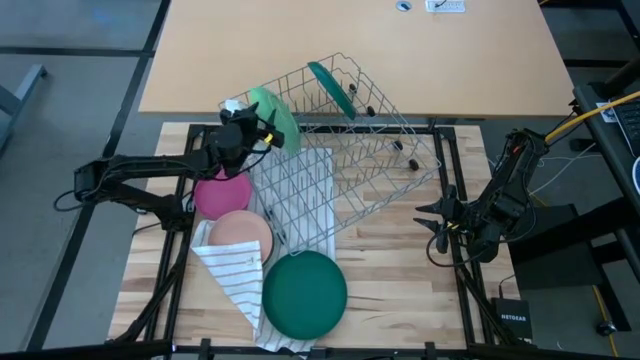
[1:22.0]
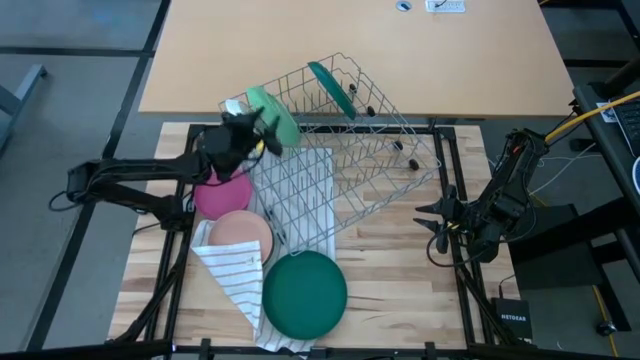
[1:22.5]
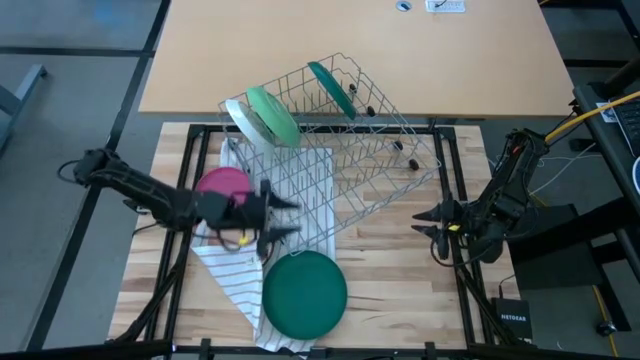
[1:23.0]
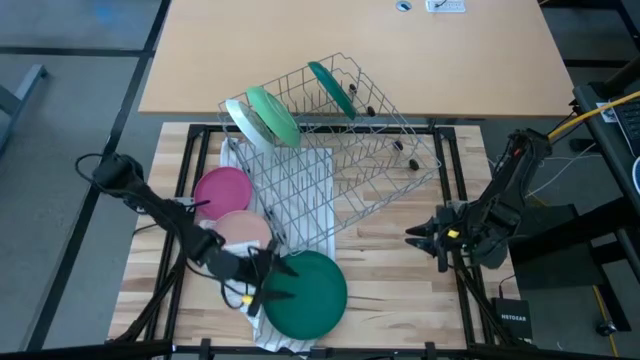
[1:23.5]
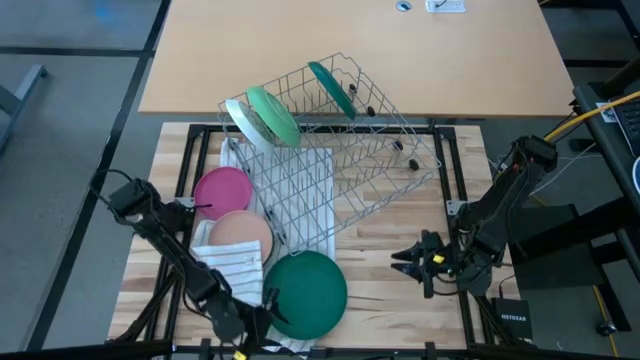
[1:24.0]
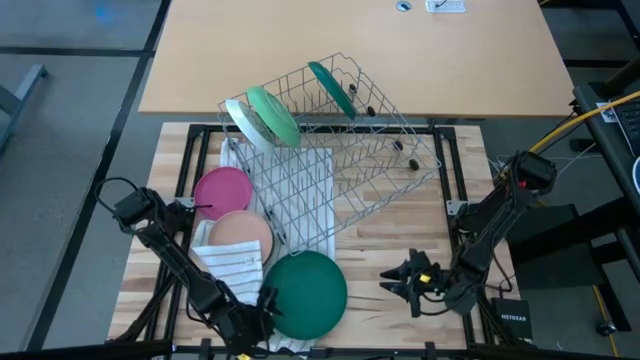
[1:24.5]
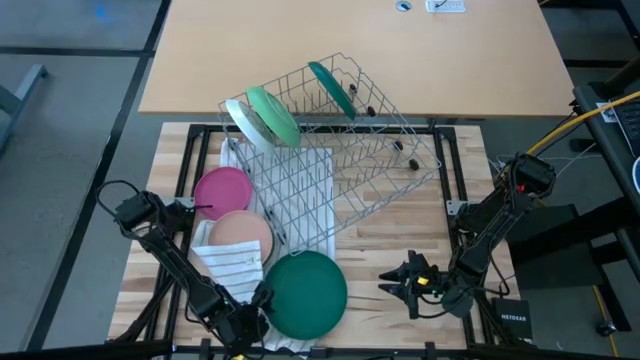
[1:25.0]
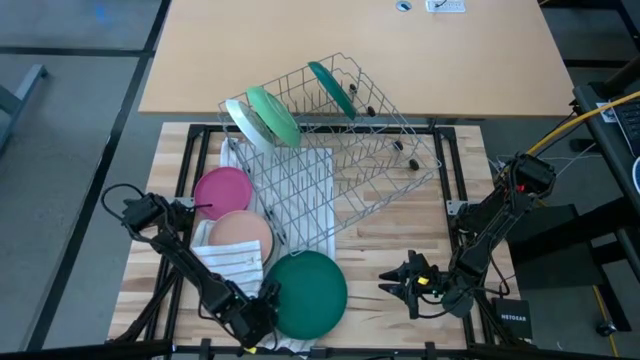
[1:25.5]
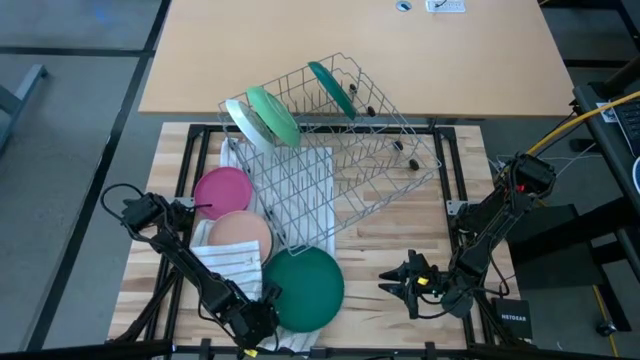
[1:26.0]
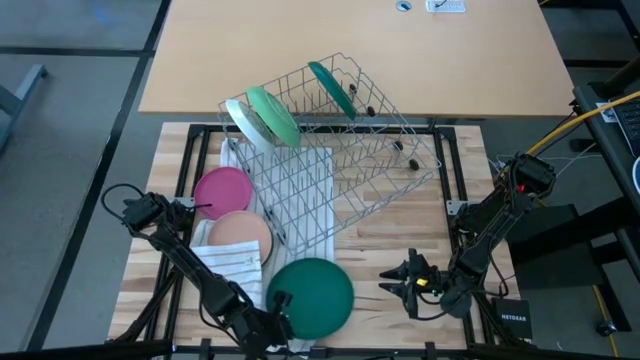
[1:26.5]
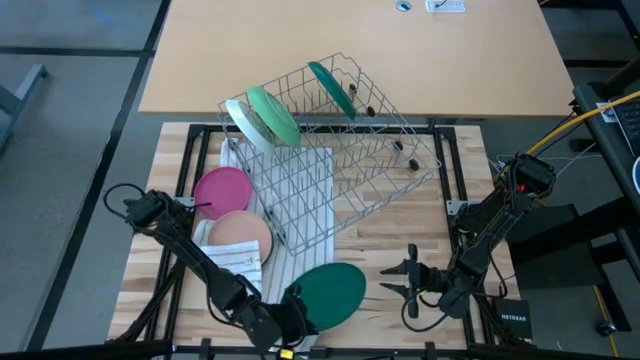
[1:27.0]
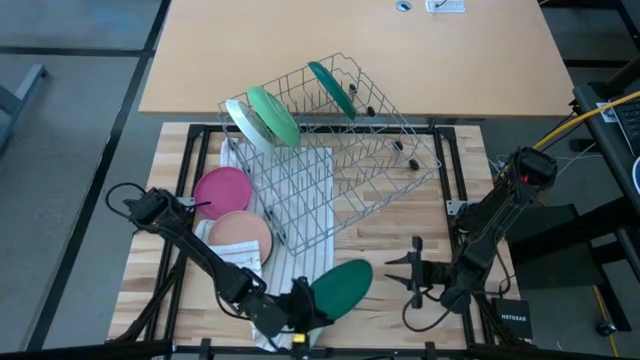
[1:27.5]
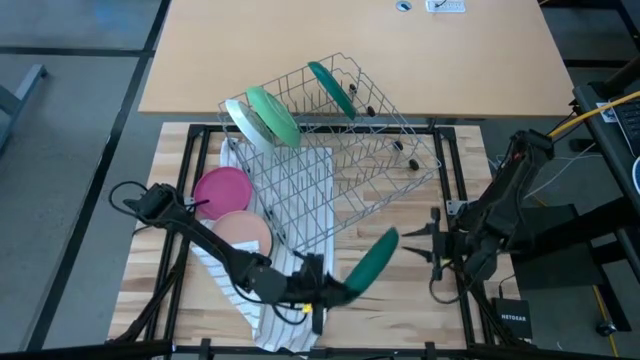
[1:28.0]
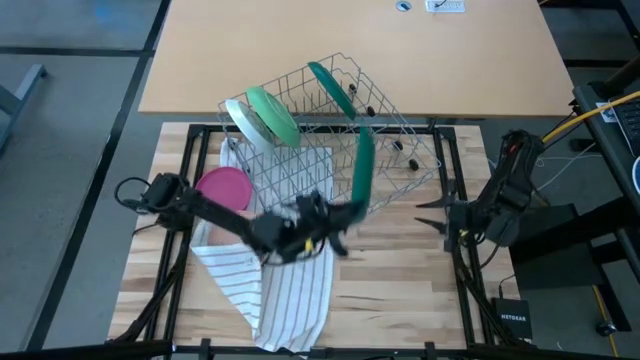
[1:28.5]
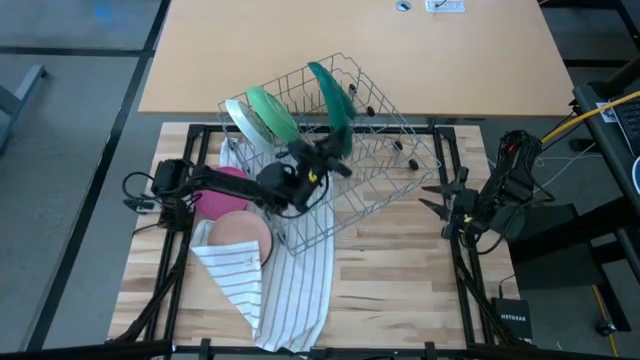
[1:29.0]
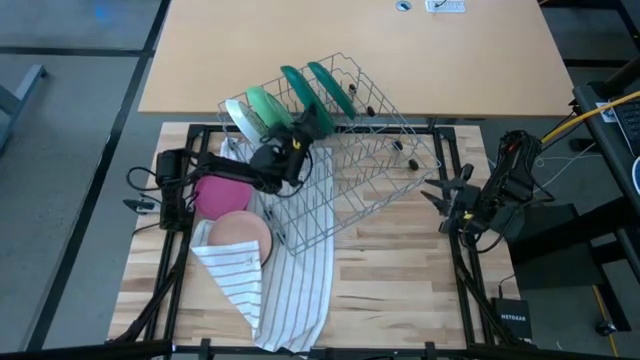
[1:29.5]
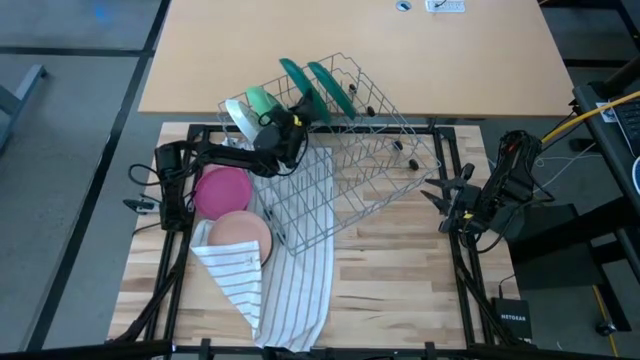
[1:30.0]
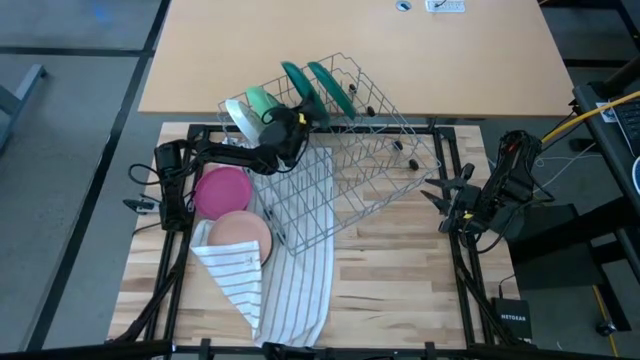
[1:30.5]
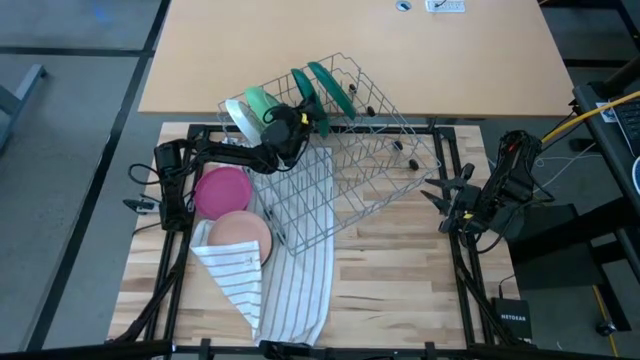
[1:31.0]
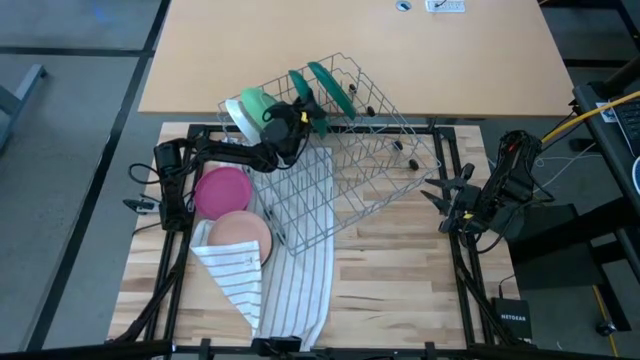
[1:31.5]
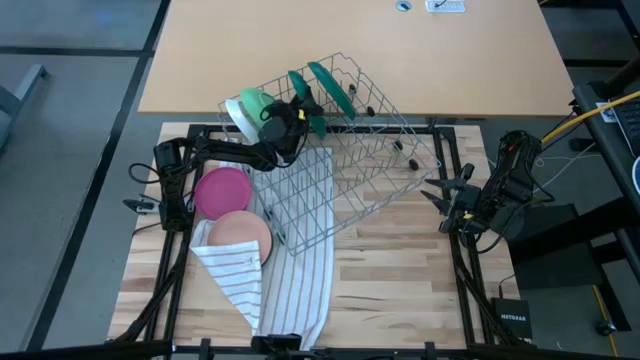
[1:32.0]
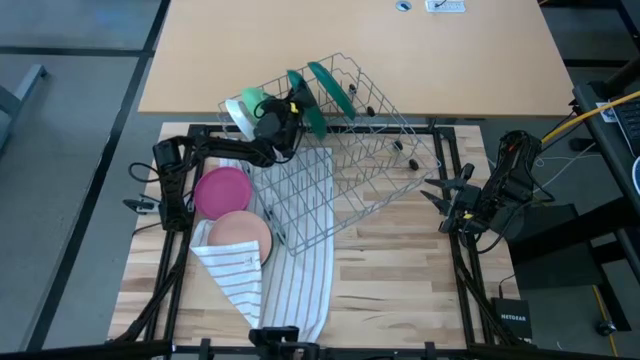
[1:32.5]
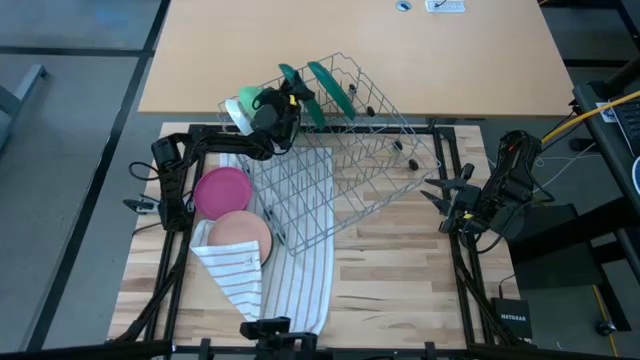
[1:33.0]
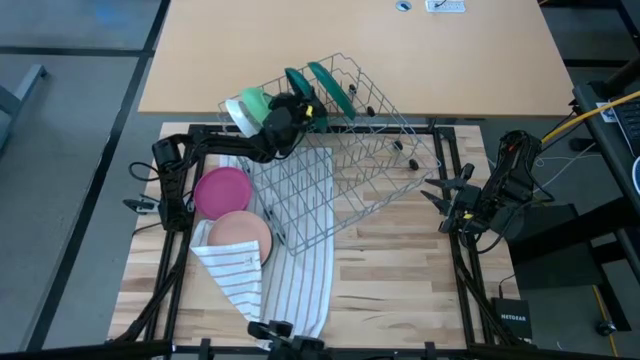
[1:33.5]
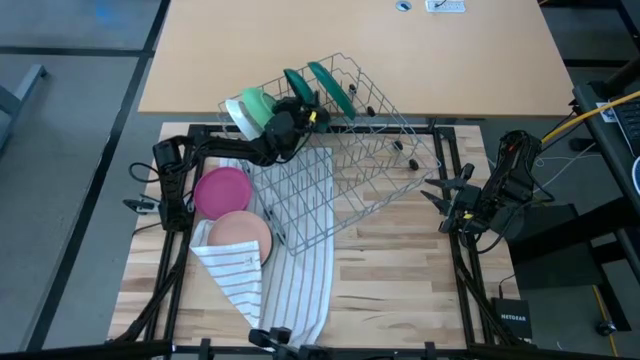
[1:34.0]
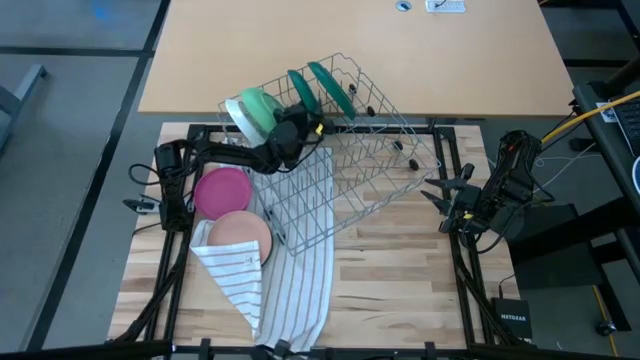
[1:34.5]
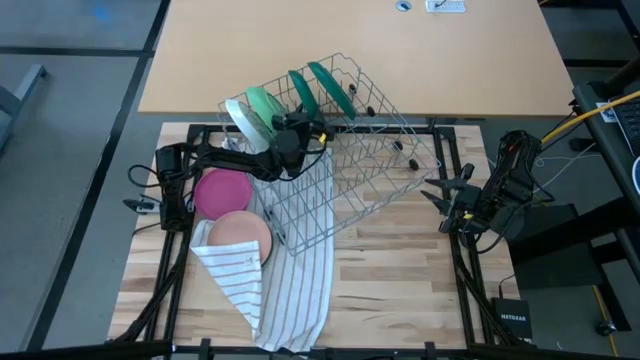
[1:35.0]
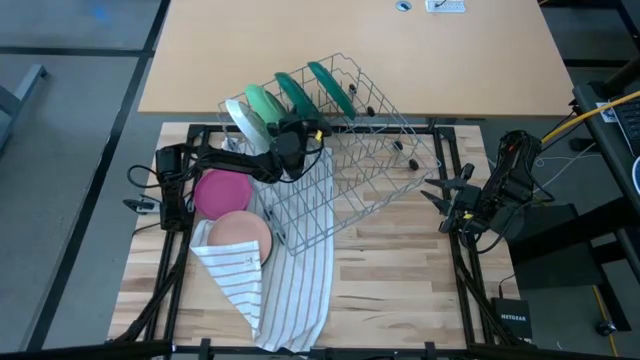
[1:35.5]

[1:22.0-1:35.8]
Task: Sort dishes
Put the dark green plate in the dish rack

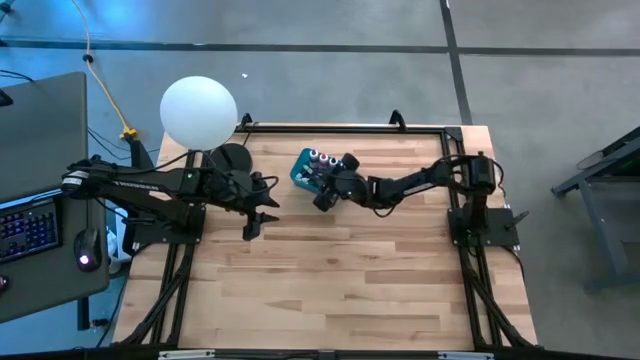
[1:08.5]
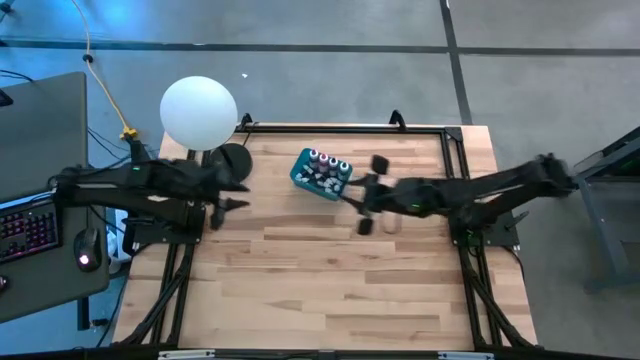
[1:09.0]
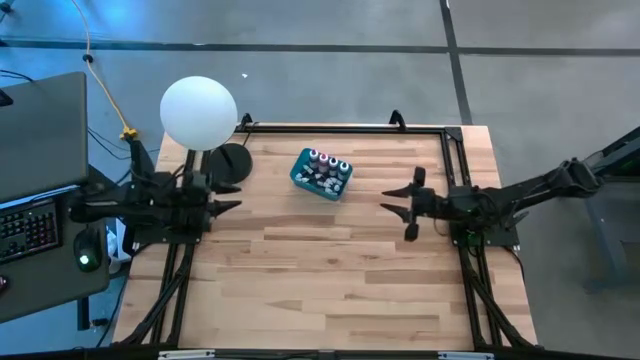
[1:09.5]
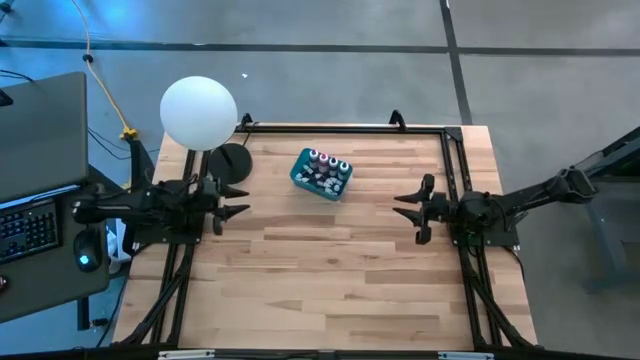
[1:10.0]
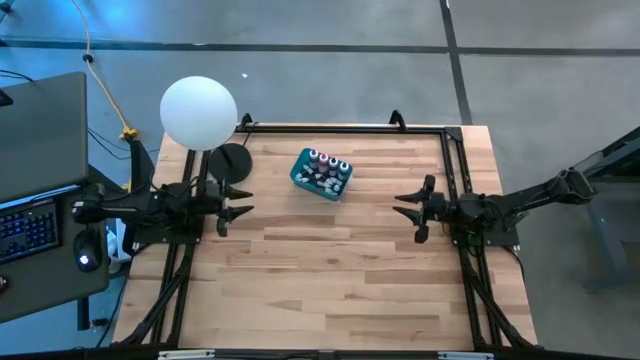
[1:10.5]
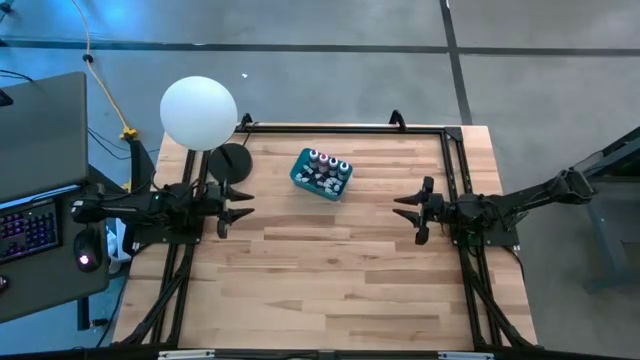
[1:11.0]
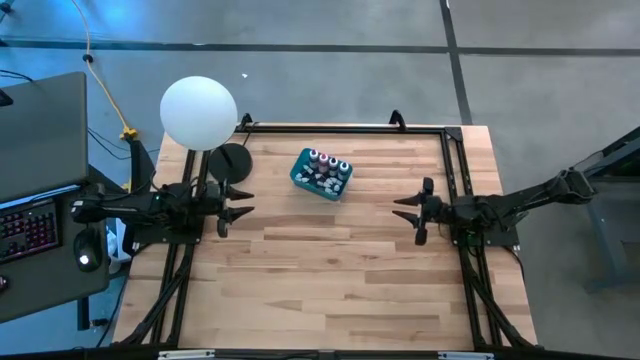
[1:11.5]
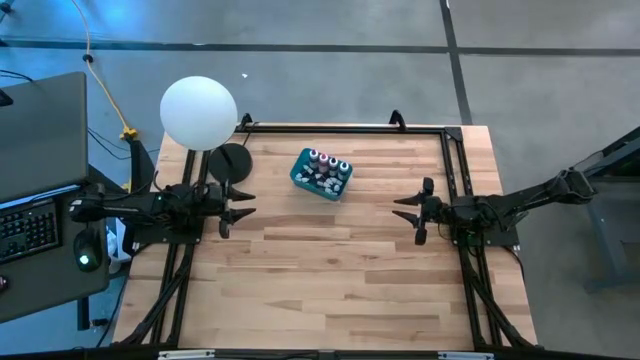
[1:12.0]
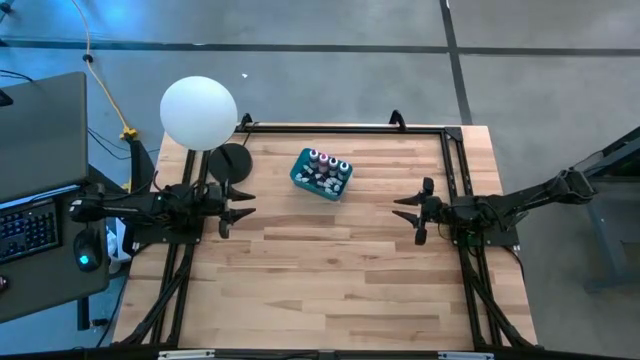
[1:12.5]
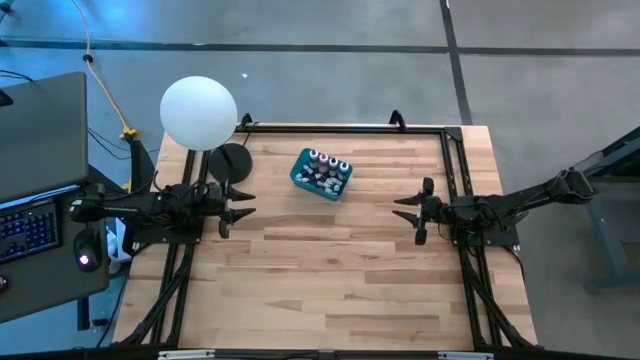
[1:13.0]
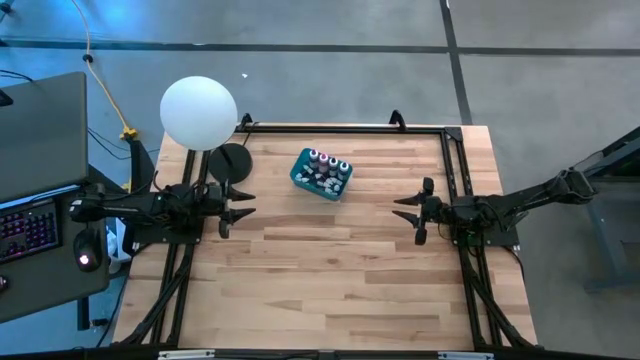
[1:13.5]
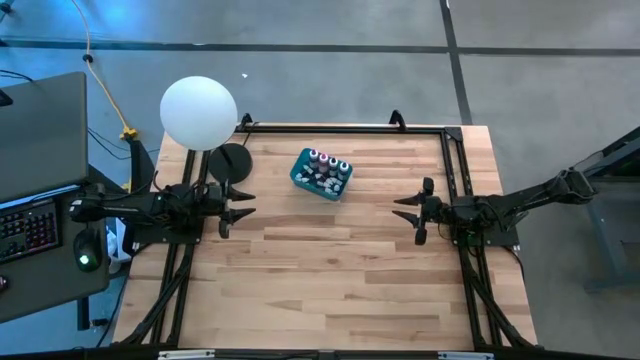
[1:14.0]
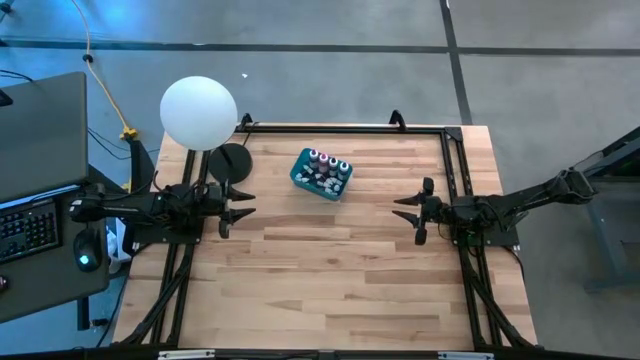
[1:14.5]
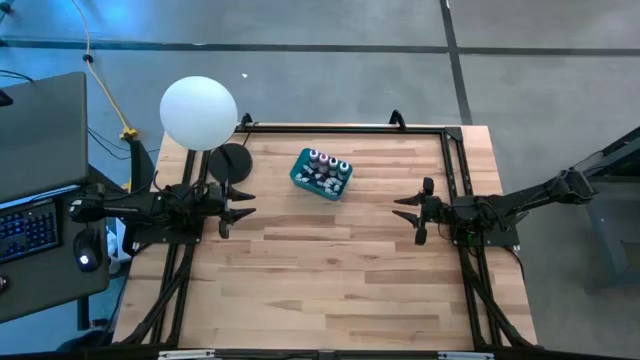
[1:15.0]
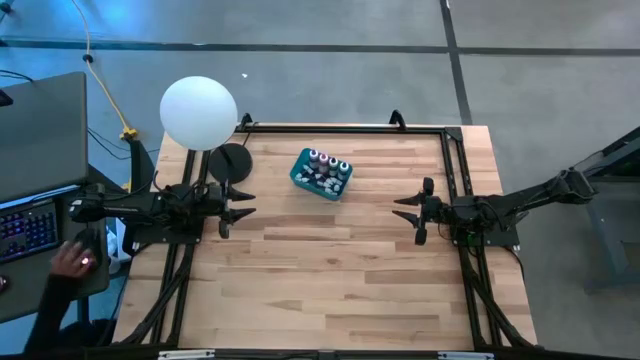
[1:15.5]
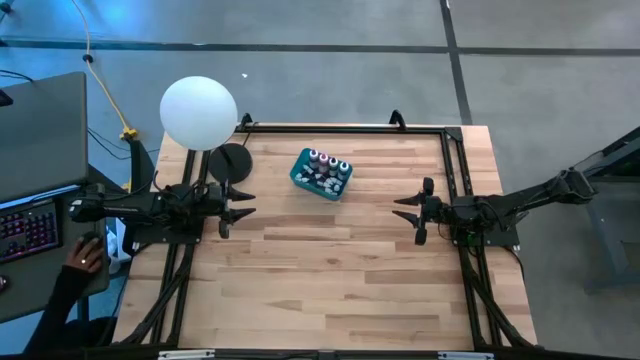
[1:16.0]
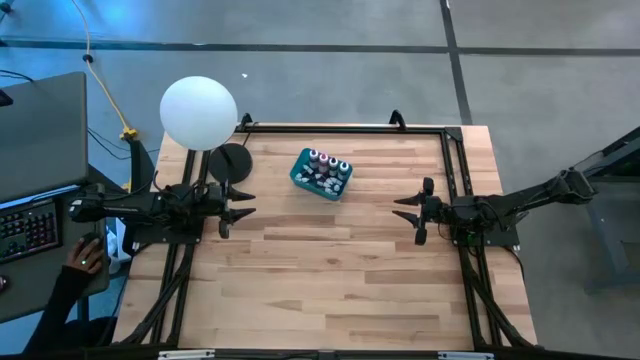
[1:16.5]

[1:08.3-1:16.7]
Task: Pick & Place food coloring
Return to Home Position
